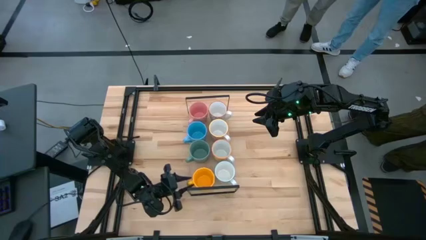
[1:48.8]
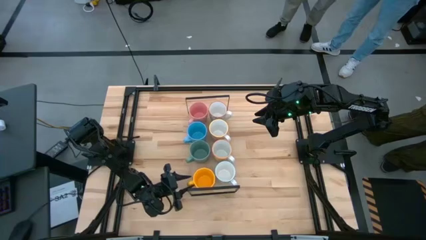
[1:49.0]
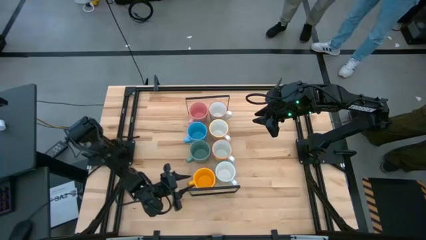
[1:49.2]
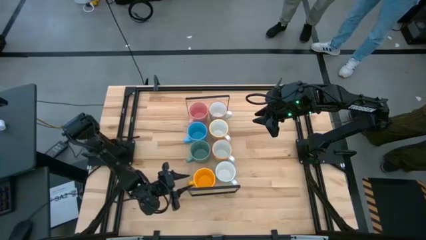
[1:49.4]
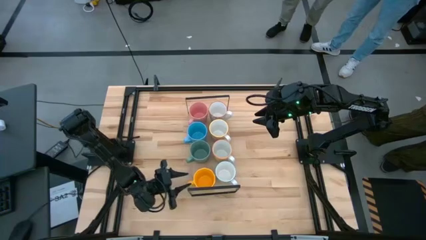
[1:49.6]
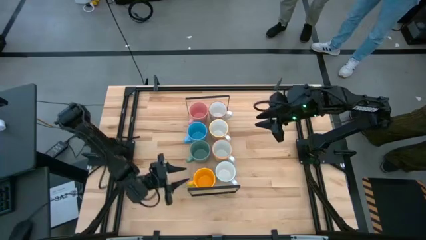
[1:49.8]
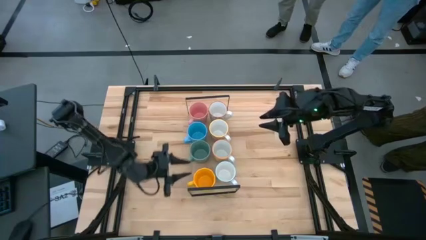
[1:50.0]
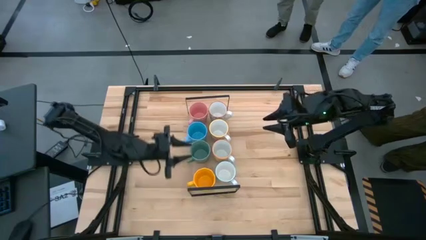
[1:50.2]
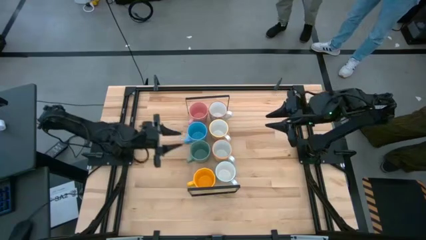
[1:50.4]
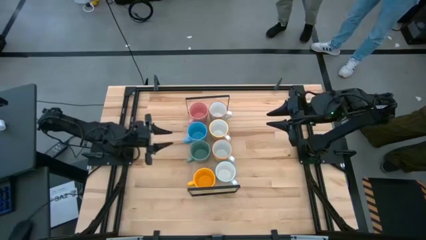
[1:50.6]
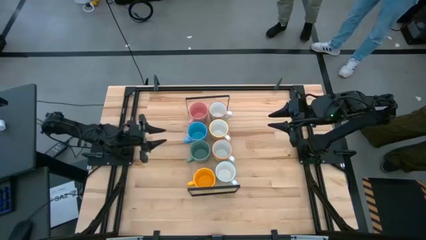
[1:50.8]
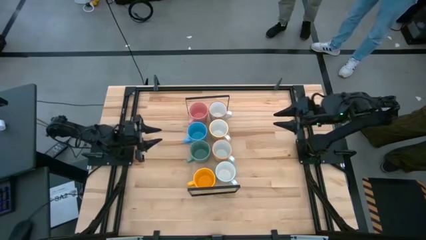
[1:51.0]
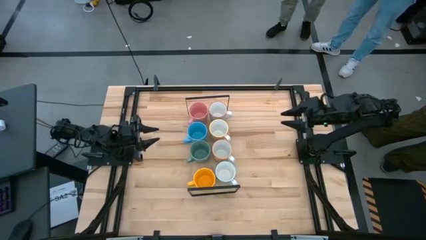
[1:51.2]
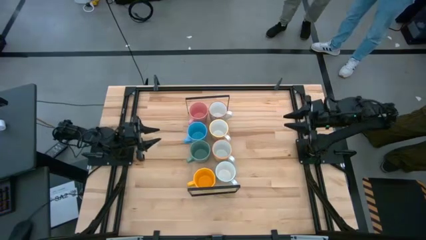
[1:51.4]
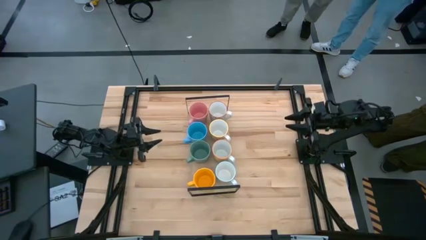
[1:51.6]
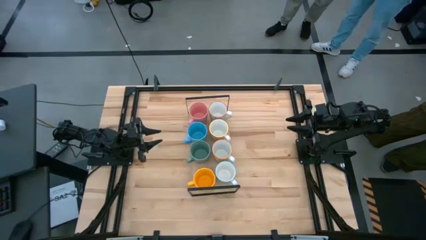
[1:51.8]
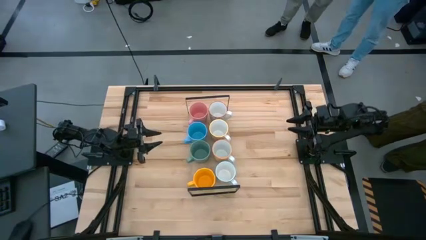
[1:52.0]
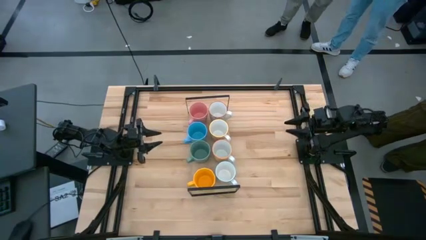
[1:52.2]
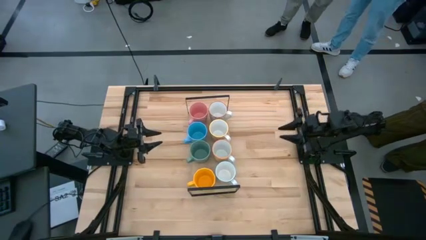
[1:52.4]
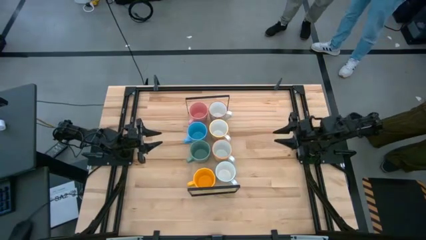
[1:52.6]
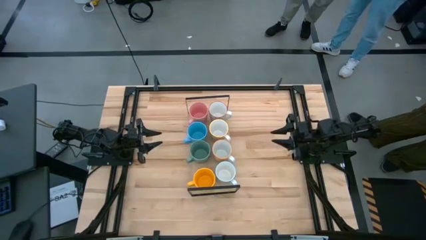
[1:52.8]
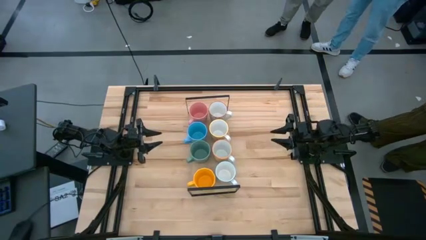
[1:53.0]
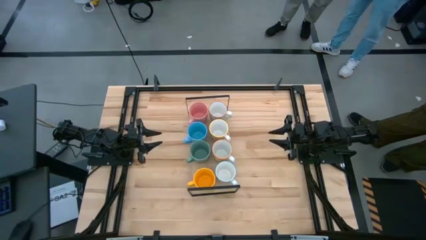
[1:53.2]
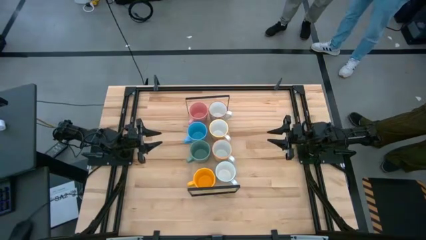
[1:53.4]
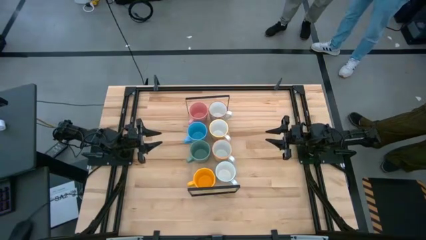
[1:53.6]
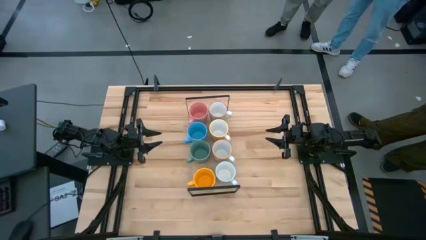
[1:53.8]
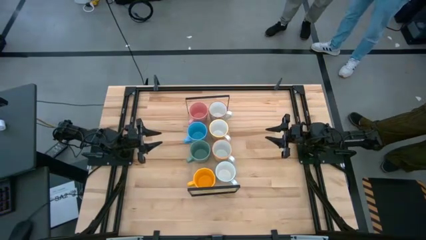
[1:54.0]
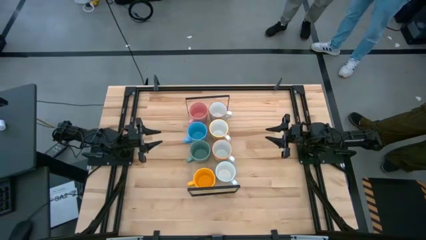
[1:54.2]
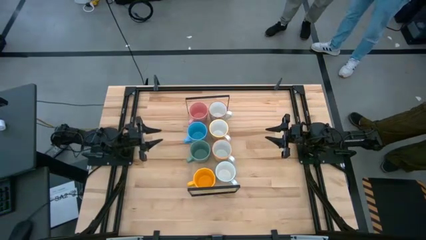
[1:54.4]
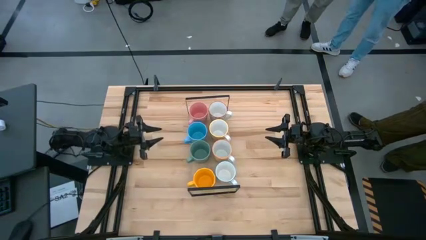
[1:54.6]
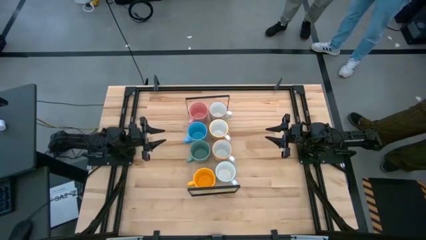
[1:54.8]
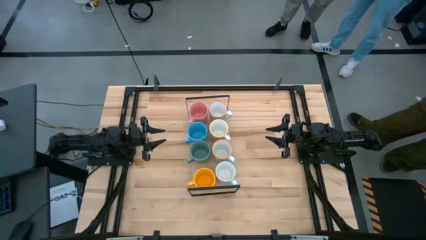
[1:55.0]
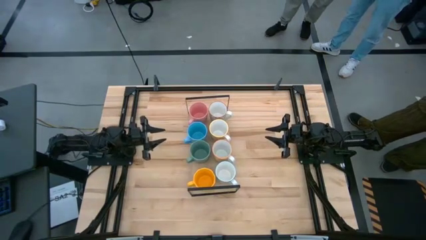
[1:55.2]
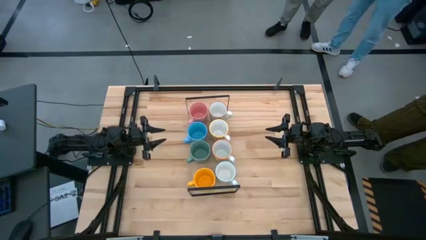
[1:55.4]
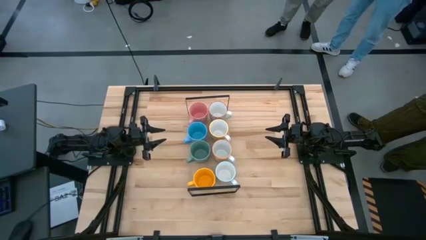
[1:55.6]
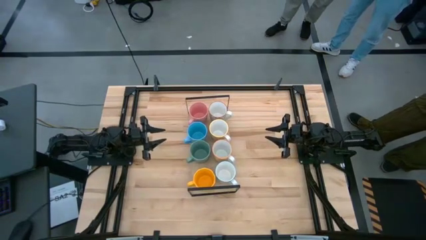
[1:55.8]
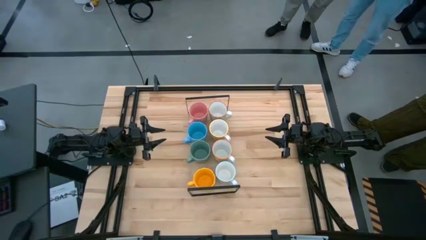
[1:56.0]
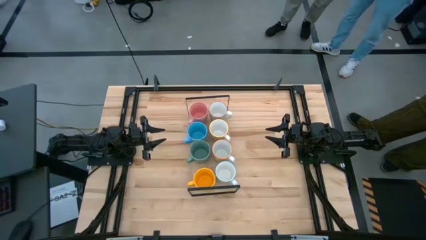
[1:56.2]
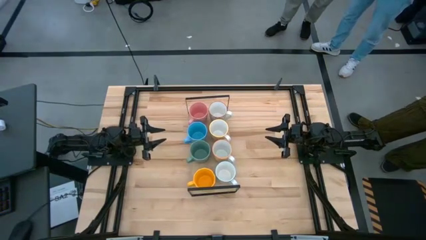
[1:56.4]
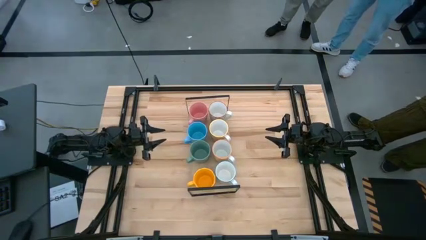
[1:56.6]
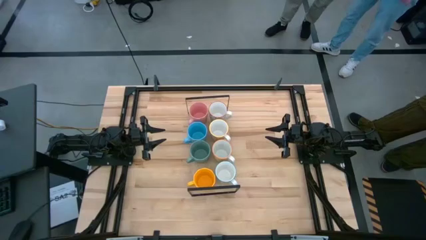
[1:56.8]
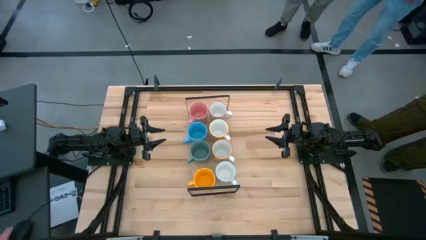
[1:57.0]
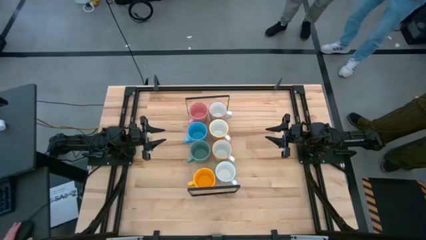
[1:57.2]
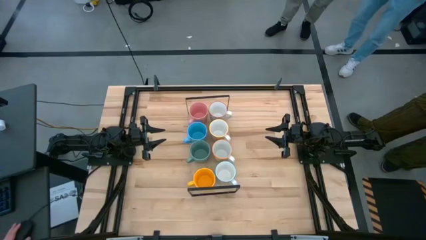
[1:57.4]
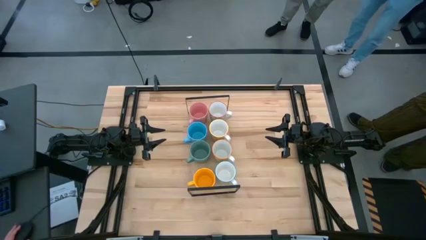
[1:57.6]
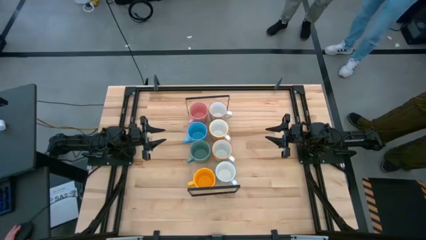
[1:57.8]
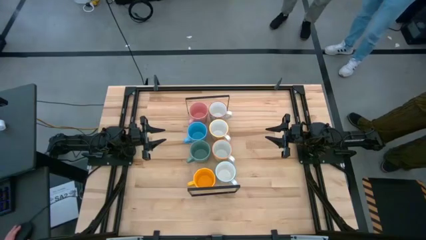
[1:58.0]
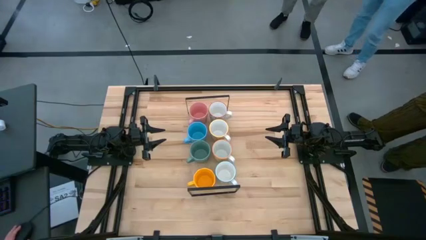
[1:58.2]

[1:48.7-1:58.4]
Task: Place coffee mugs
Return to Home Position

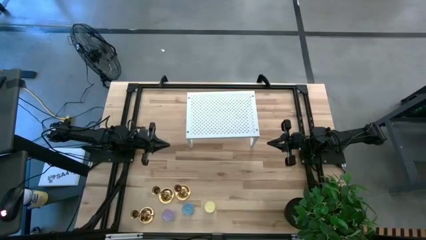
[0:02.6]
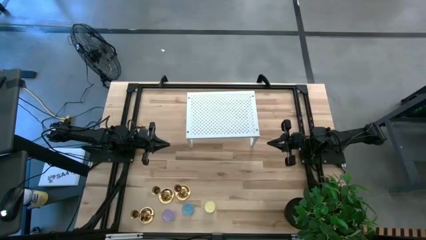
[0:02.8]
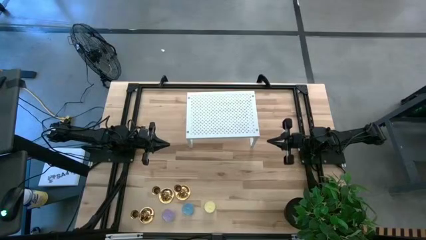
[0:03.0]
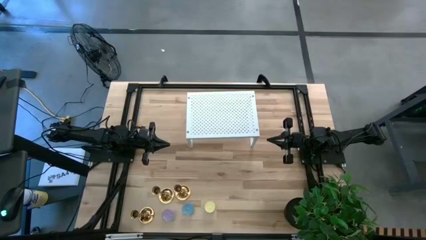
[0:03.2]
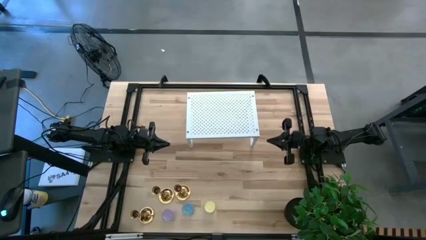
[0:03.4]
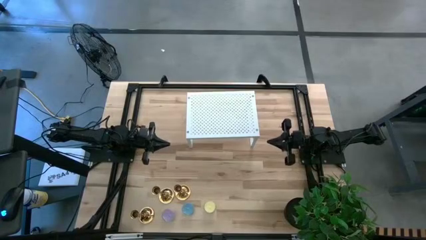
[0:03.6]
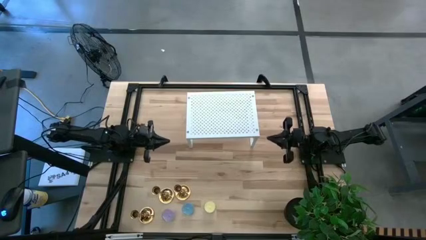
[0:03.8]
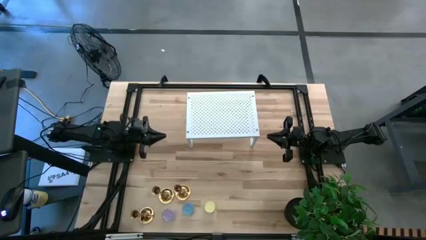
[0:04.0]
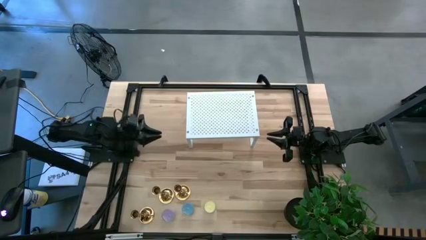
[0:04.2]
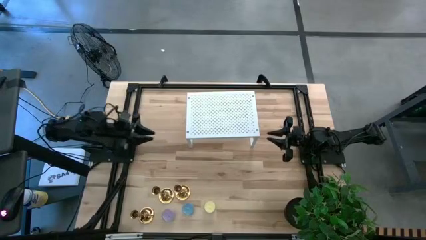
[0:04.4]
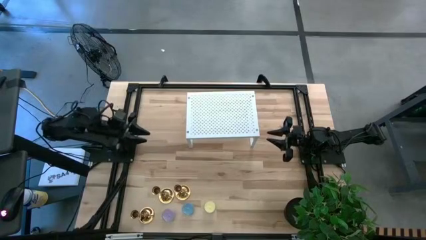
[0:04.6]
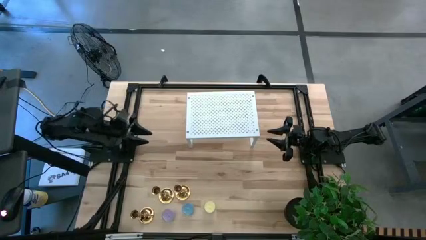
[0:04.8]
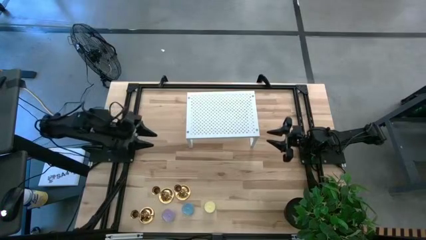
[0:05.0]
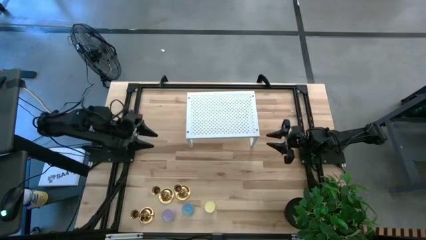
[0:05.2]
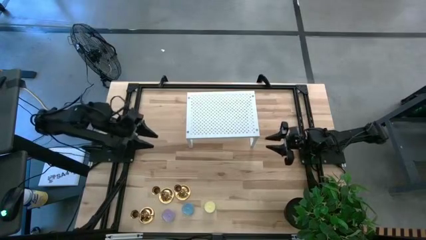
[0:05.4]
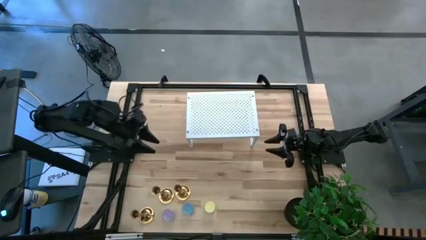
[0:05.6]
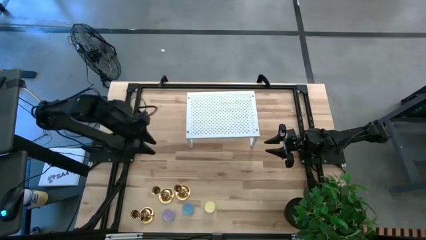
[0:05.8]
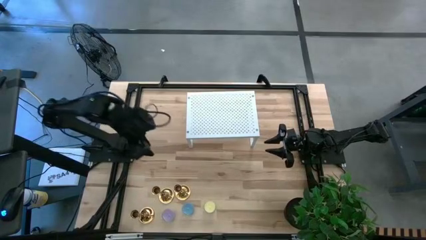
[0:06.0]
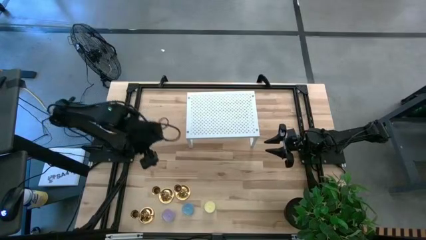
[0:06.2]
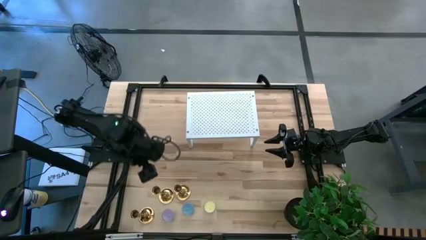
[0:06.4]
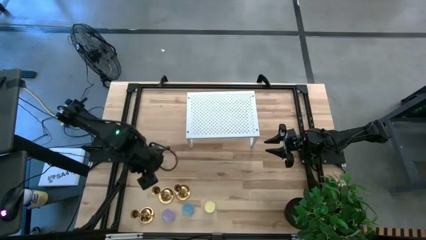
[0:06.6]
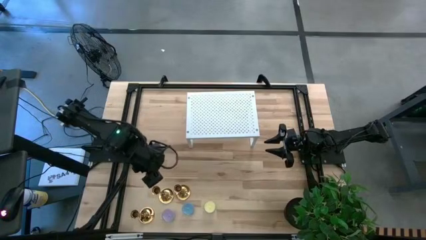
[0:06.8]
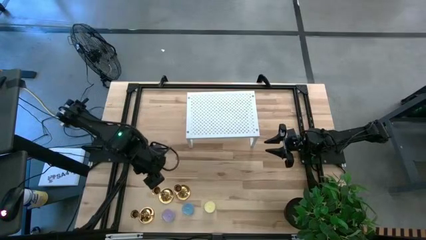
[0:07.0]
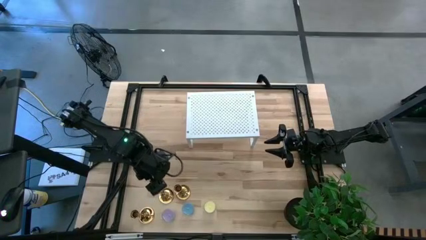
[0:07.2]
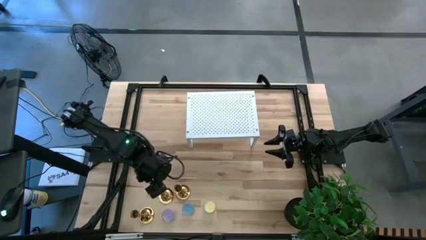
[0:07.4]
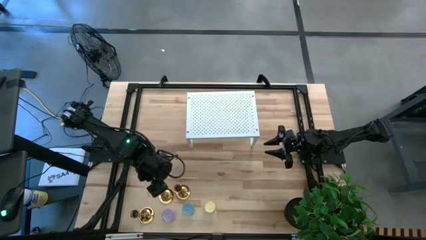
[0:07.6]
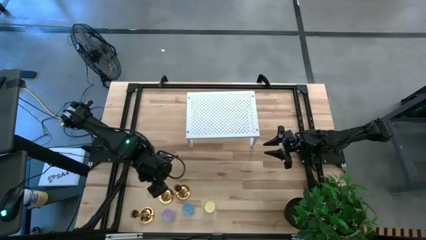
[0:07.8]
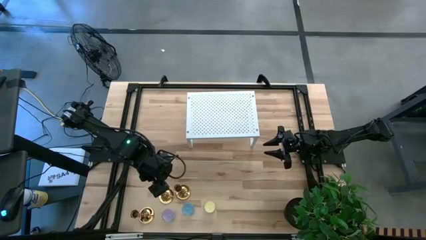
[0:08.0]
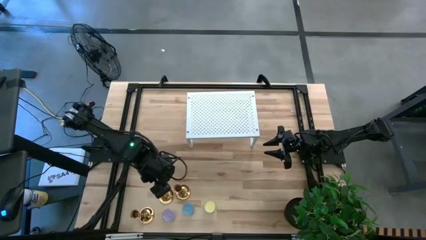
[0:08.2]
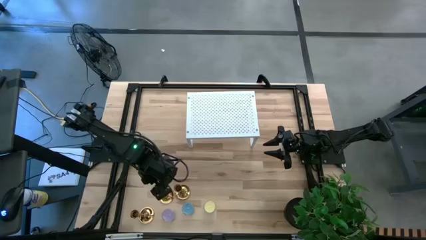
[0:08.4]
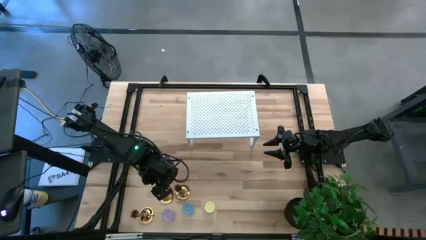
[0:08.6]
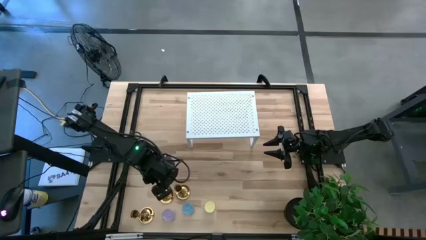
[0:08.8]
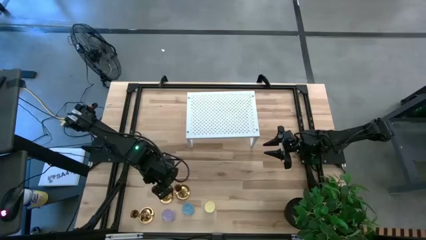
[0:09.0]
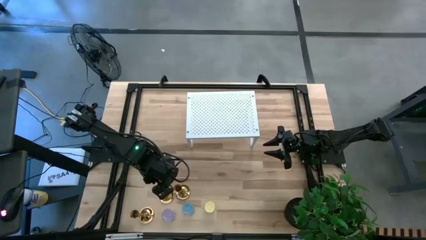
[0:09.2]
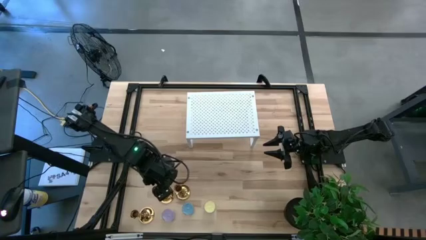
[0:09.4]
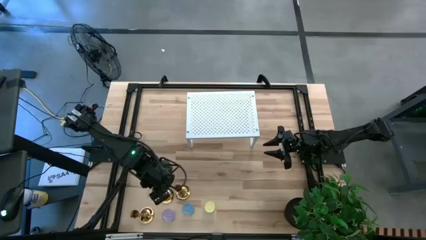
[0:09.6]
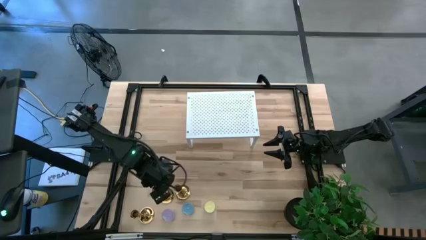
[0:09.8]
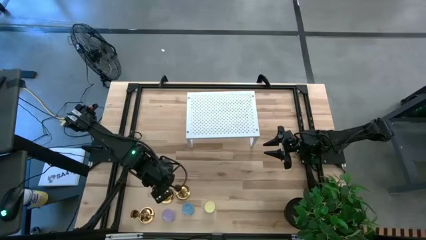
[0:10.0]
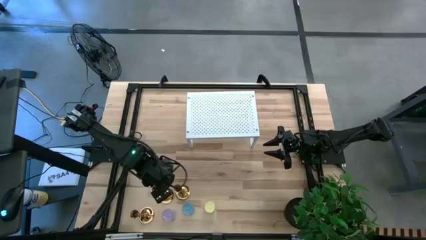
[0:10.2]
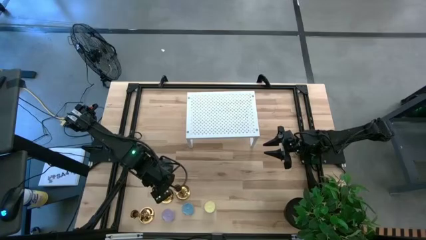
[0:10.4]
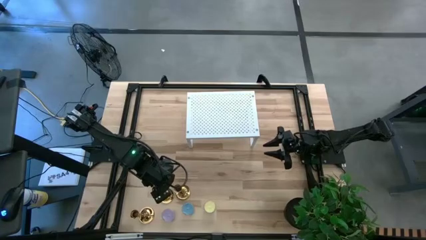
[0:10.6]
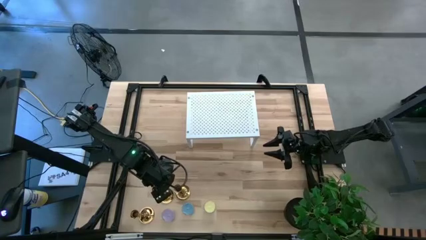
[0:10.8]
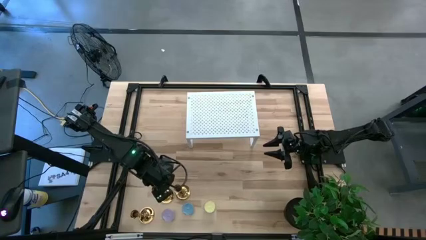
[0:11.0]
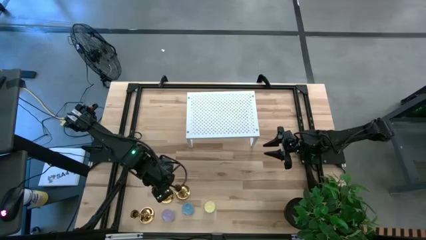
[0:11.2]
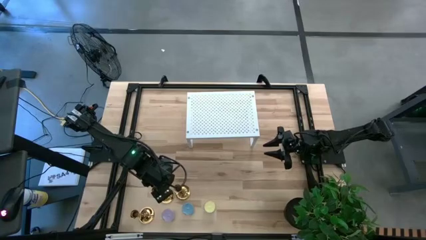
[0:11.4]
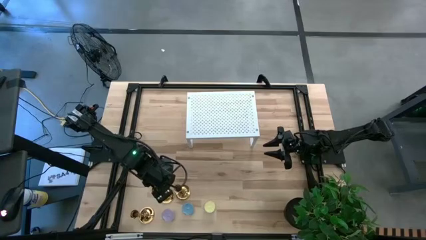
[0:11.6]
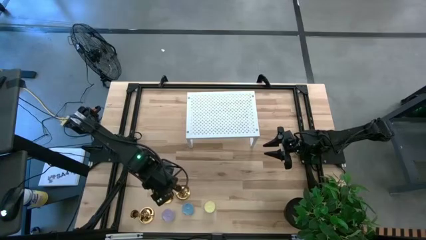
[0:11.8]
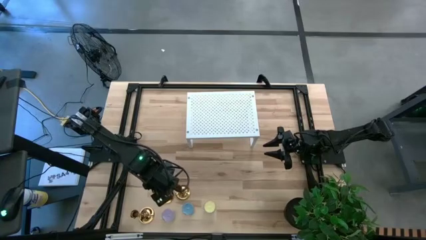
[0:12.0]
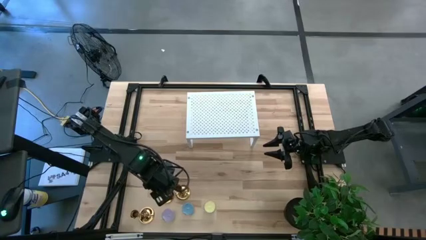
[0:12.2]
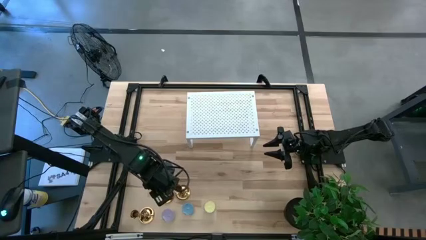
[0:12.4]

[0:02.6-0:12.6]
Task: Pick & Place candle stick holders
Put the middle gold candle holder on the shelf
